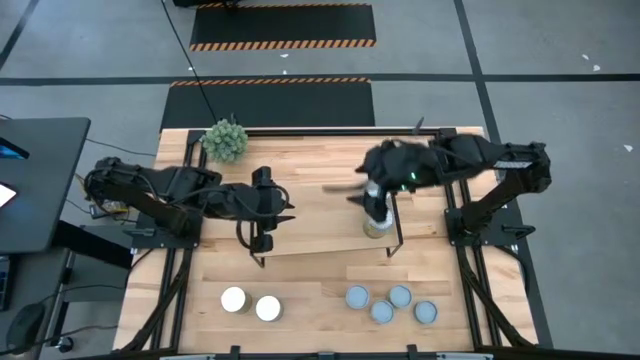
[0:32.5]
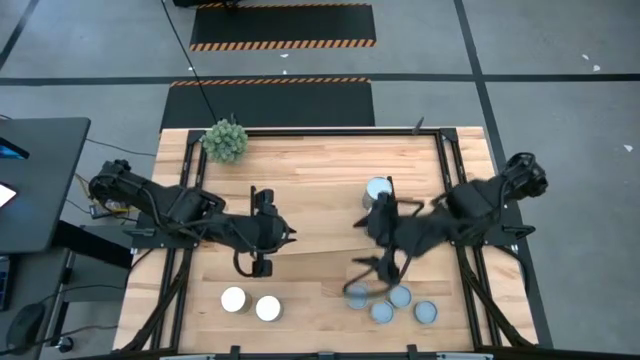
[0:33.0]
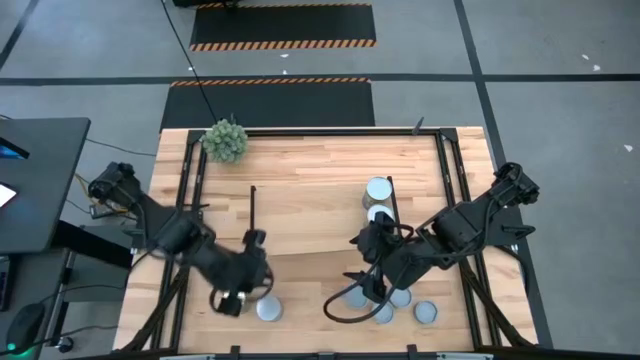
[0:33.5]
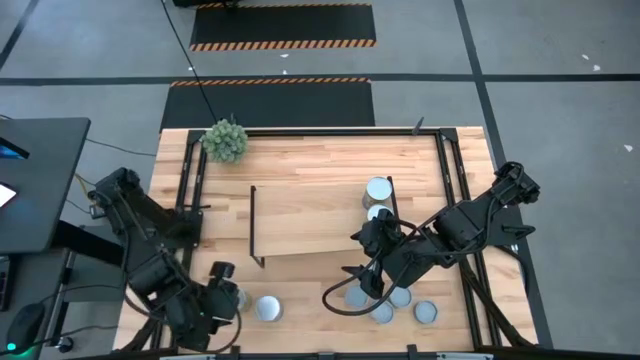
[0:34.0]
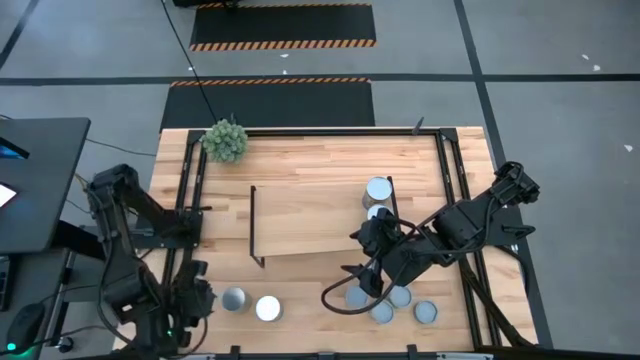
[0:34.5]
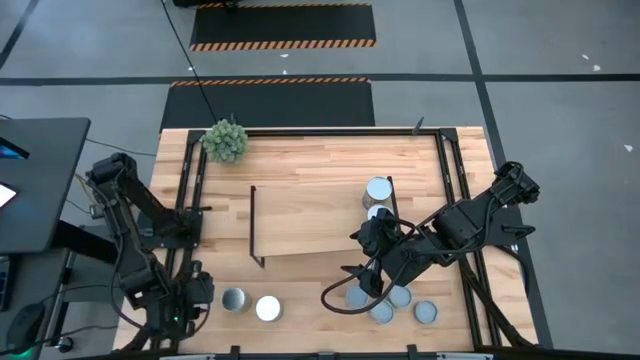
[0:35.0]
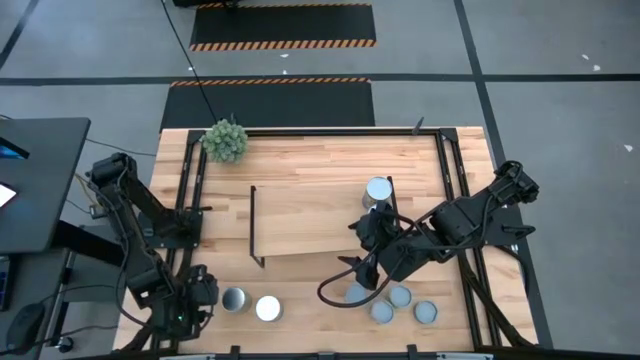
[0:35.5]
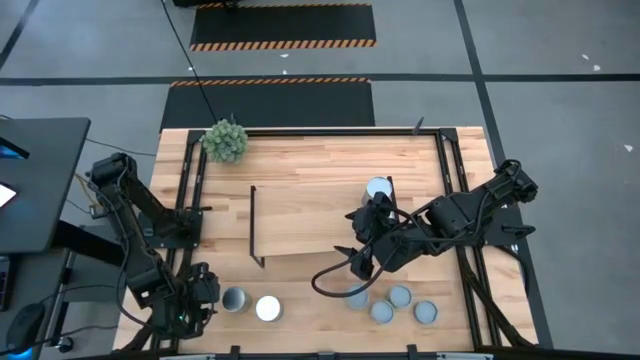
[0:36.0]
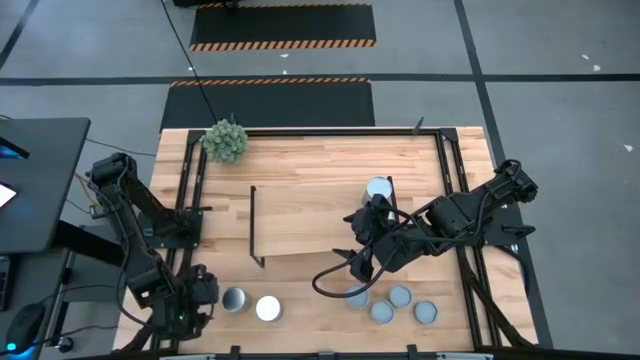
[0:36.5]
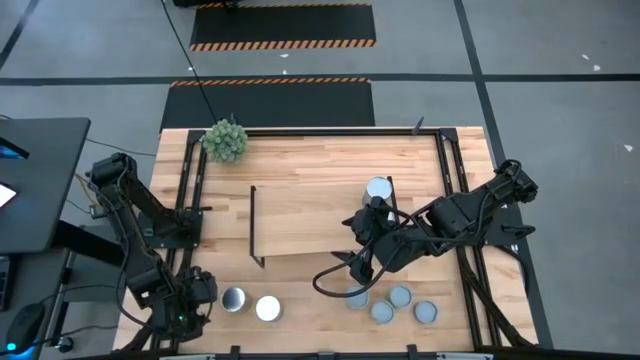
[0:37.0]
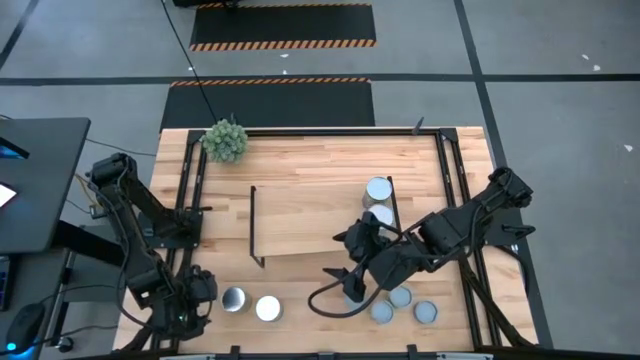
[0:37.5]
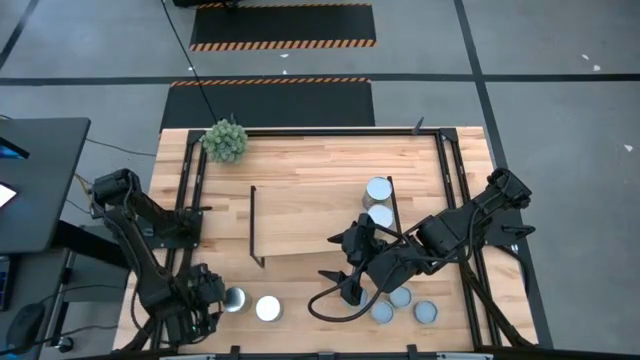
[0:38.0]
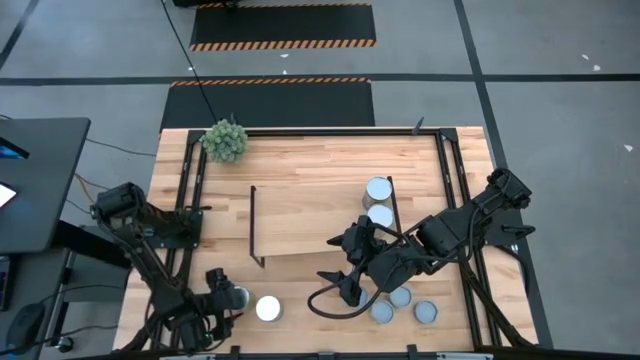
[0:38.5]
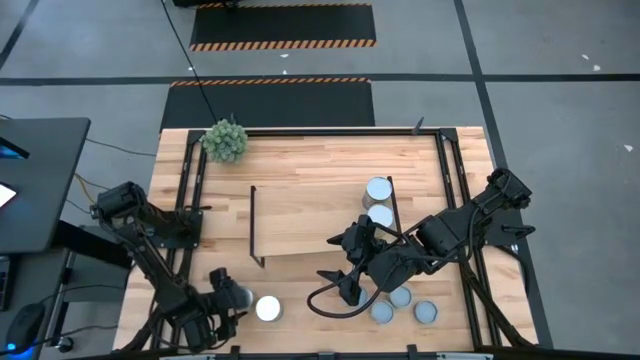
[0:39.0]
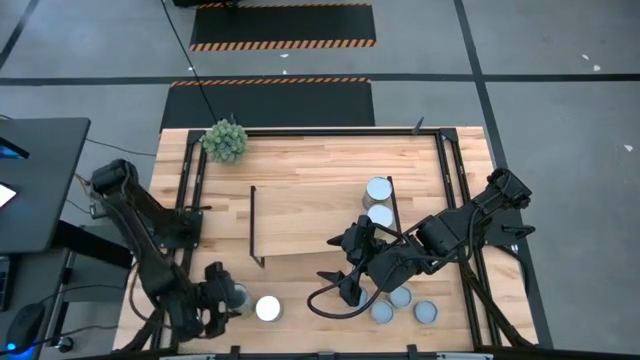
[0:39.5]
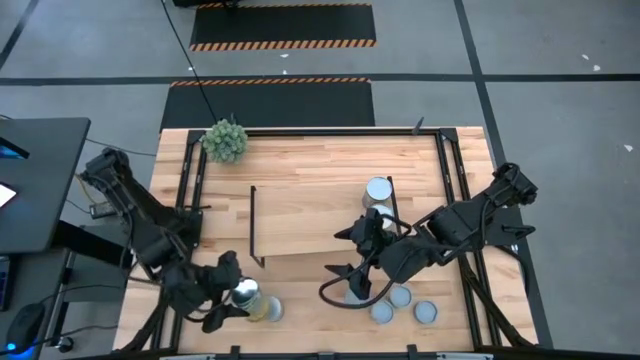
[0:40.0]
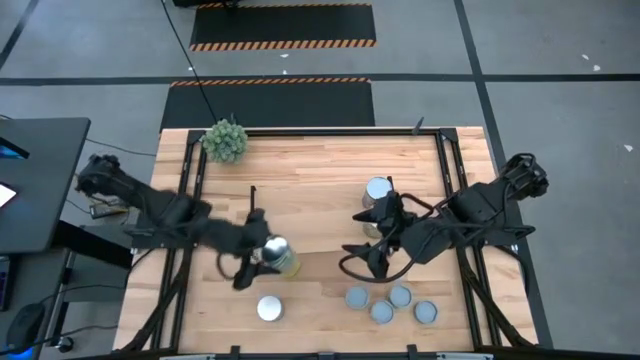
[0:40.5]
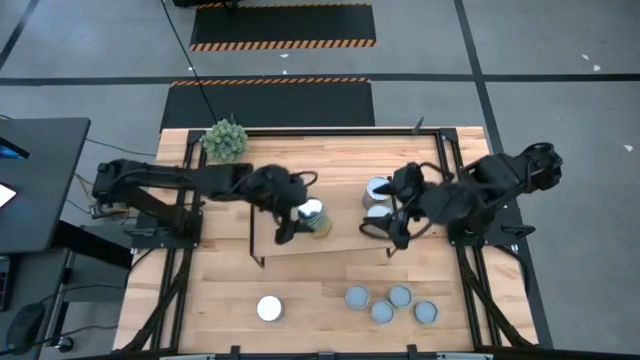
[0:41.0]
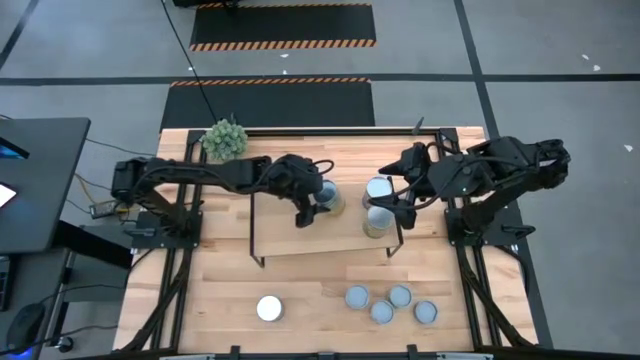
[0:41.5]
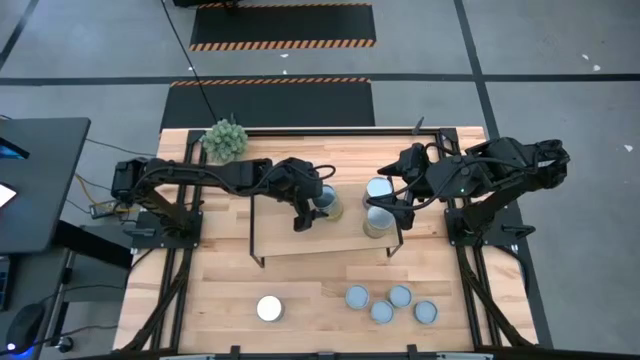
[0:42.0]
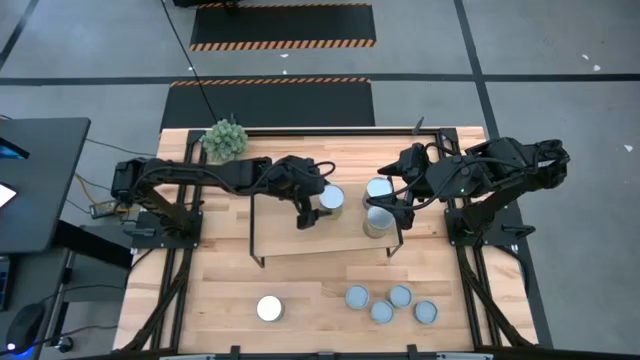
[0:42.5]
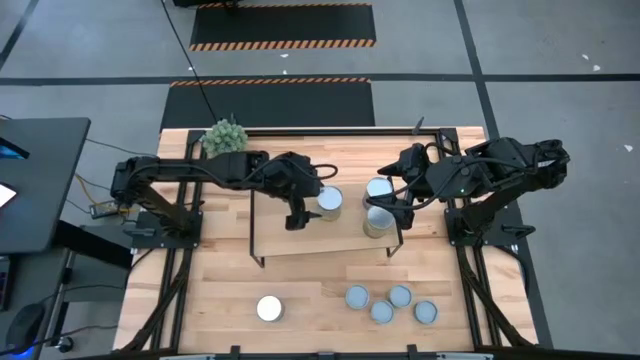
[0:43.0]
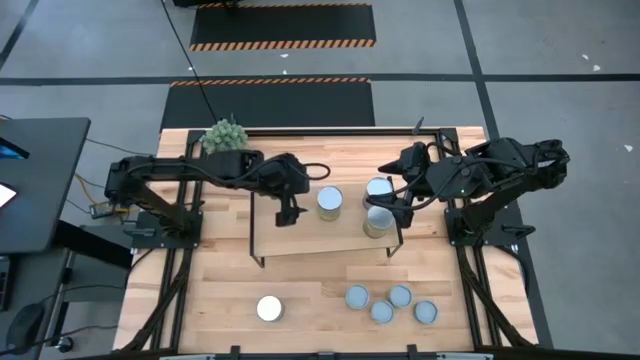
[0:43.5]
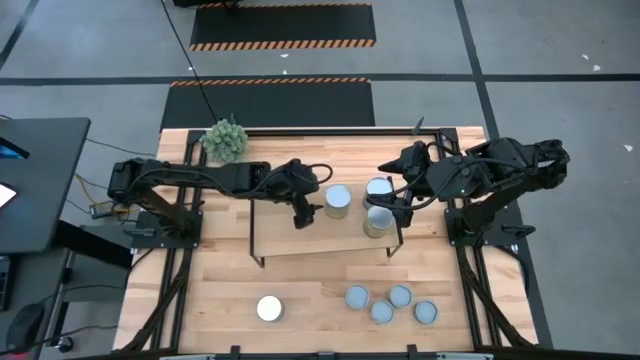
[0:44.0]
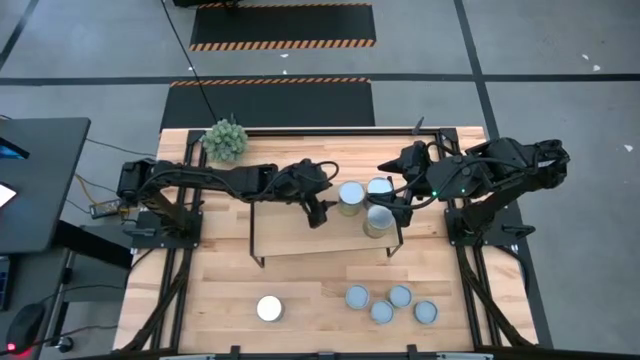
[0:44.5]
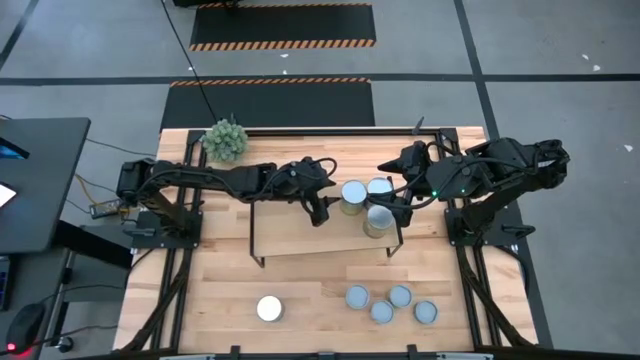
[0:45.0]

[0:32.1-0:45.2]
Task: Pick and place cans onto a shelf
Put the canned carrots on the shelf

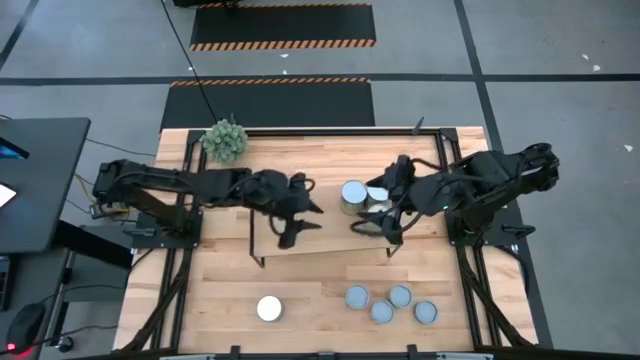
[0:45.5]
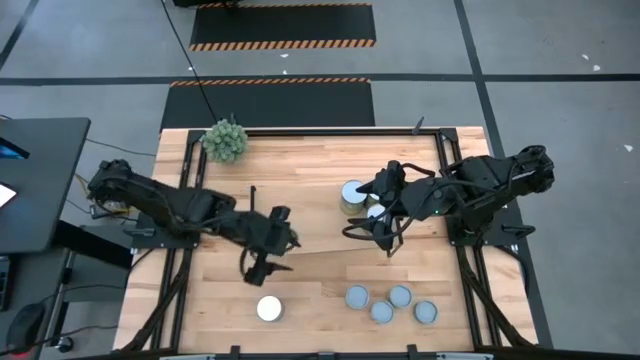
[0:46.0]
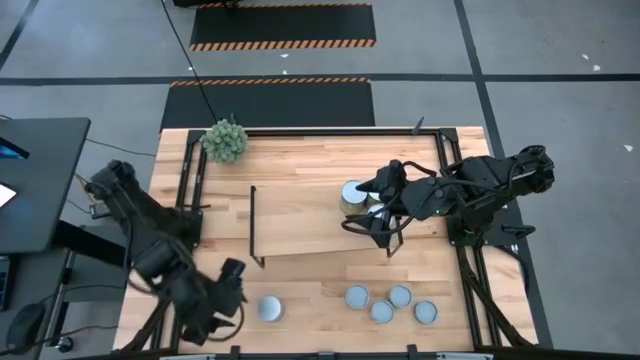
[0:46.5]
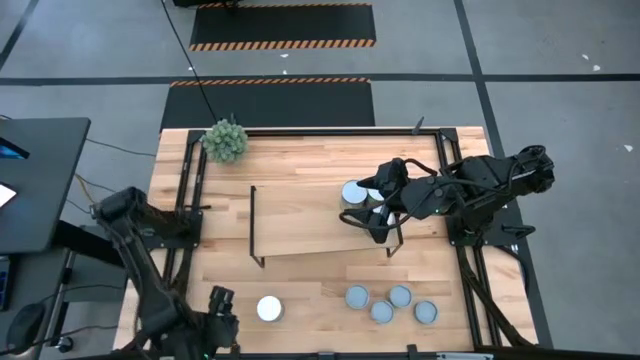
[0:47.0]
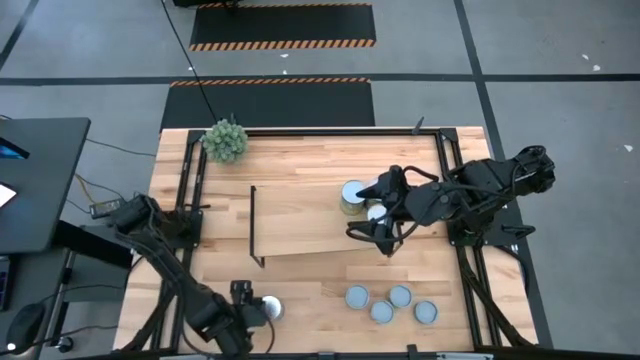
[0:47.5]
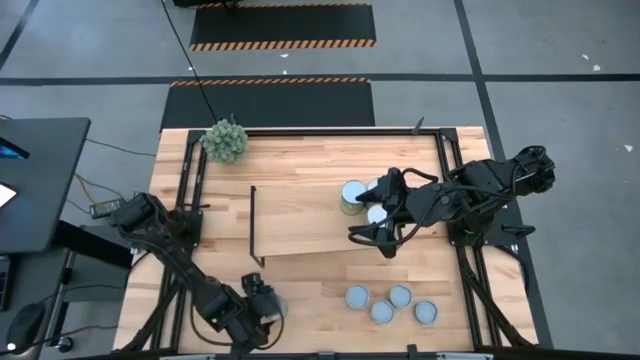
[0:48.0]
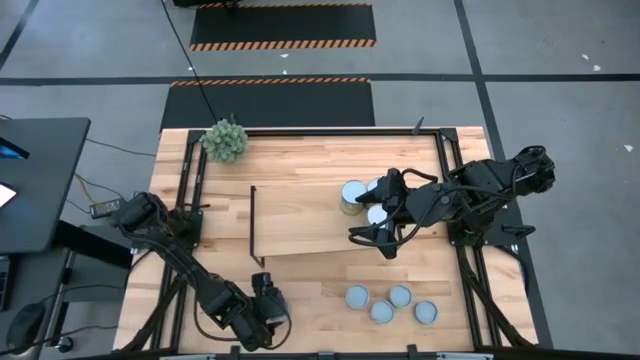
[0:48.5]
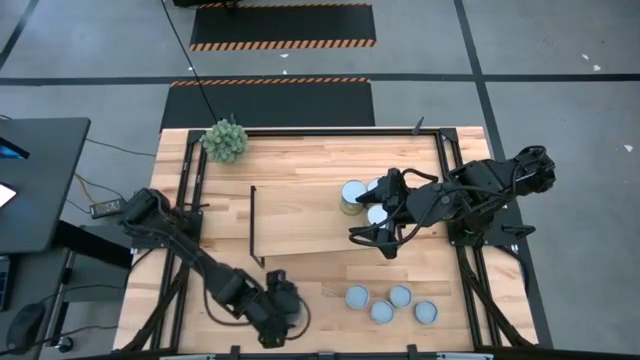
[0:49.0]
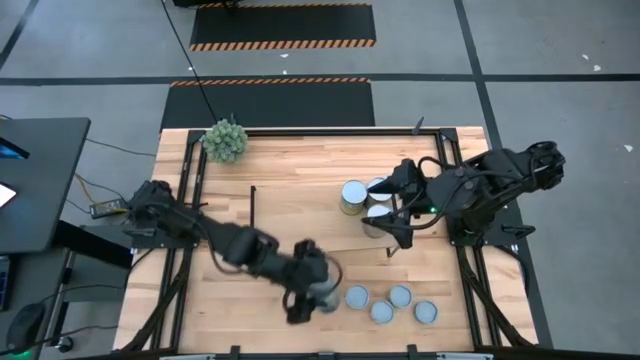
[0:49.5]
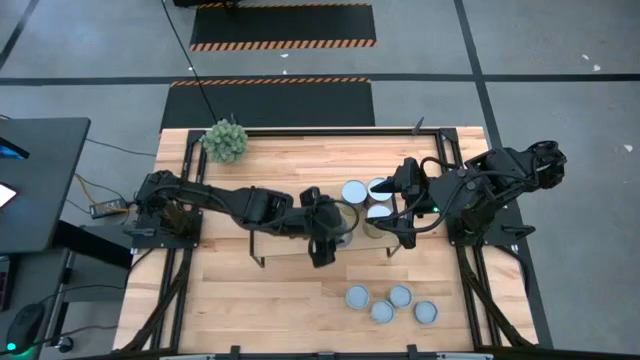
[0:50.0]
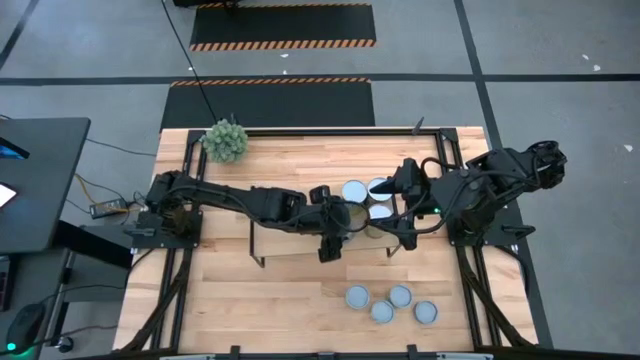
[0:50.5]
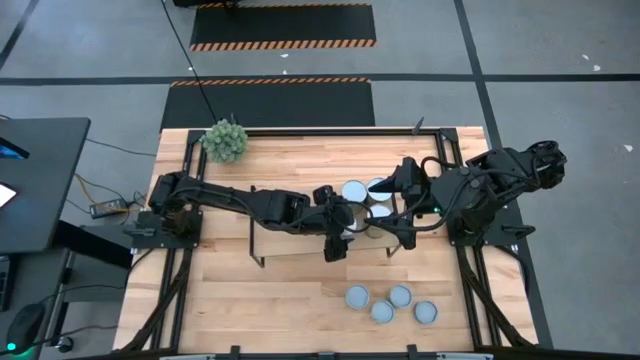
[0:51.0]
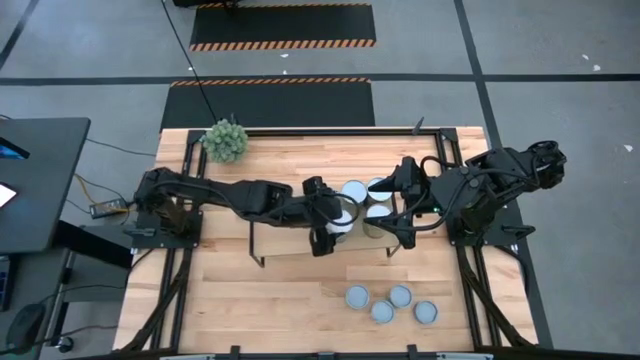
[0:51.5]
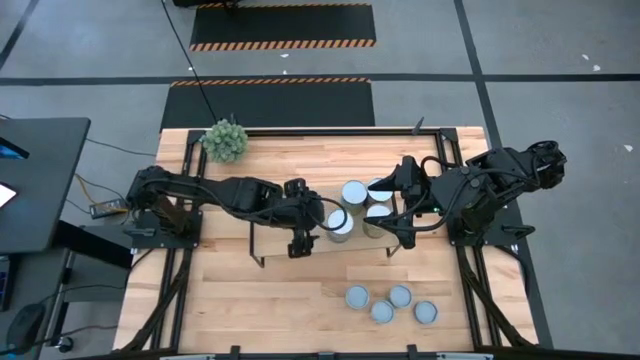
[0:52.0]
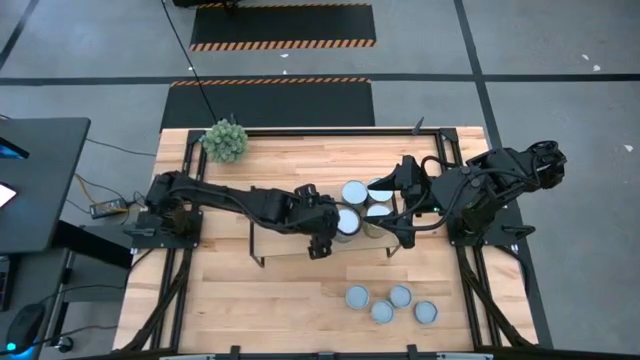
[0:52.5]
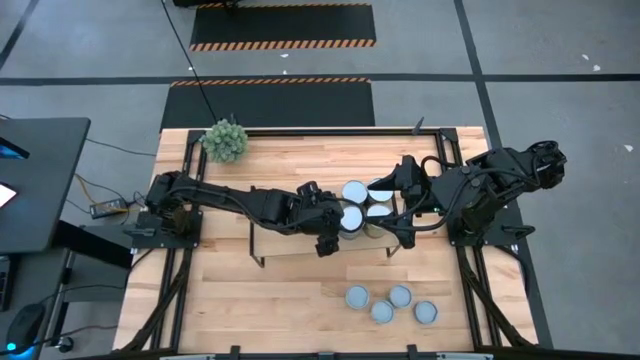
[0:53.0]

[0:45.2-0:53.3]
Put the canned peas on the shelf
